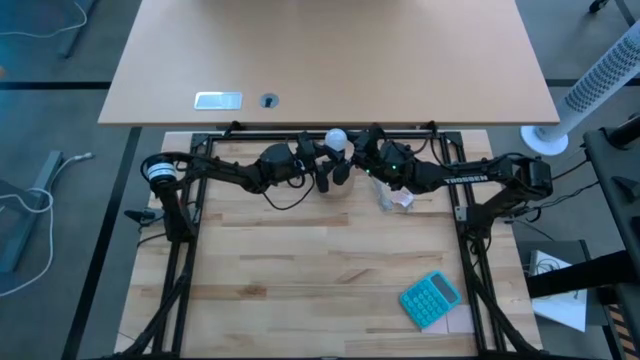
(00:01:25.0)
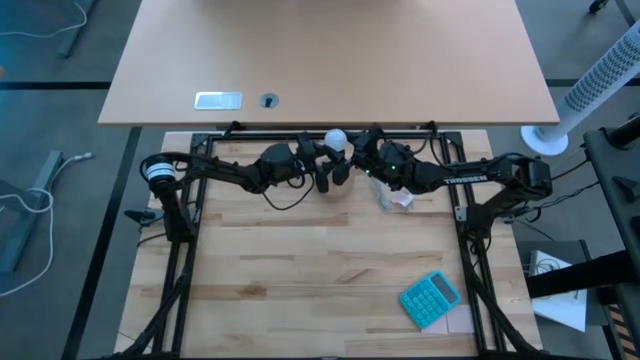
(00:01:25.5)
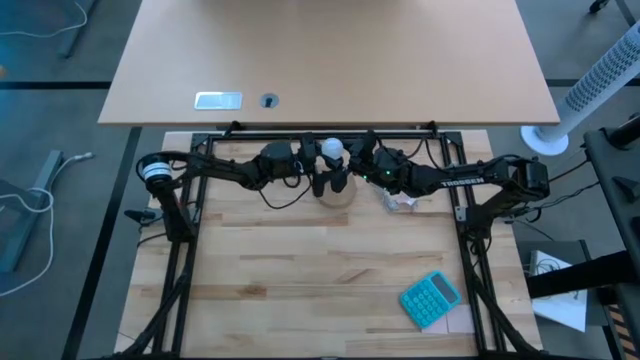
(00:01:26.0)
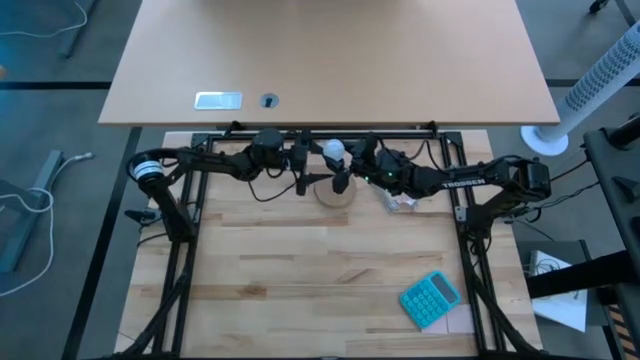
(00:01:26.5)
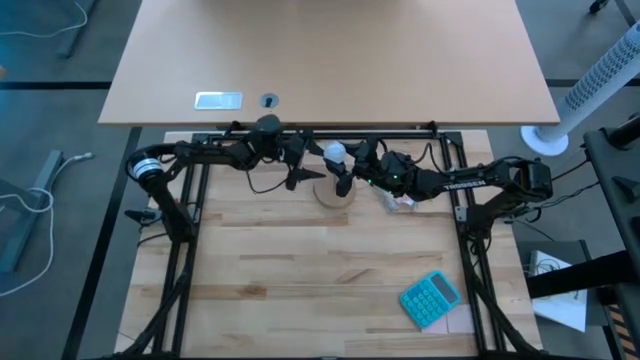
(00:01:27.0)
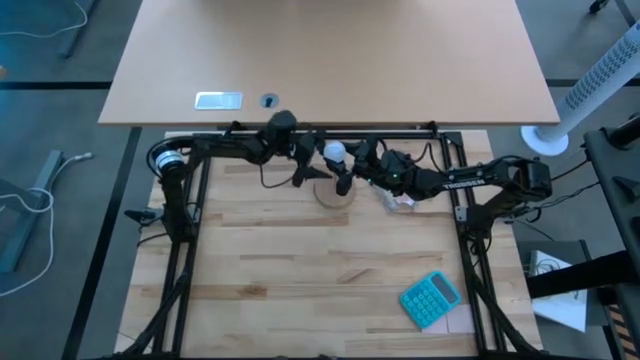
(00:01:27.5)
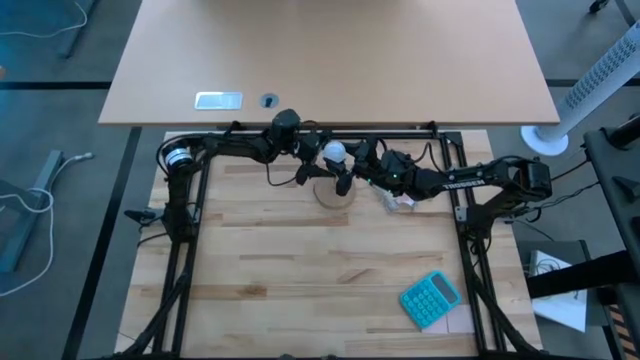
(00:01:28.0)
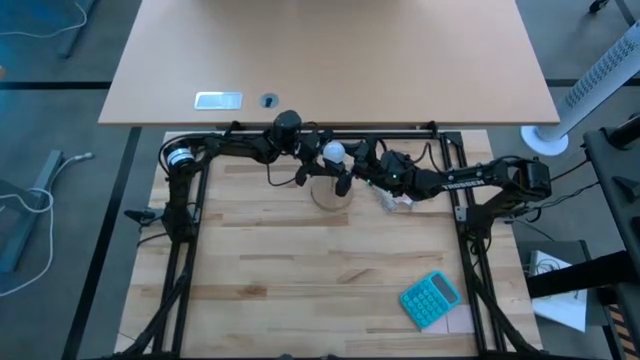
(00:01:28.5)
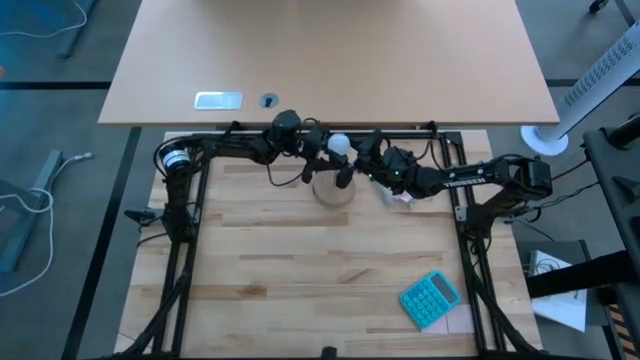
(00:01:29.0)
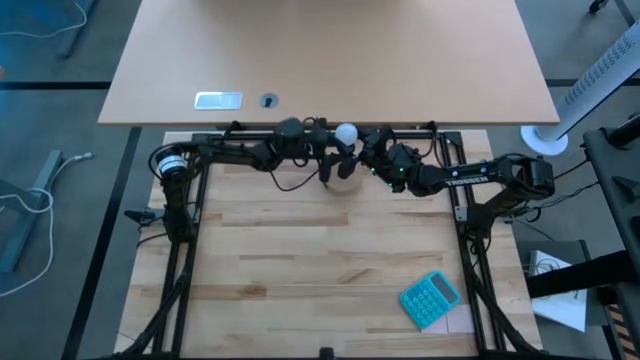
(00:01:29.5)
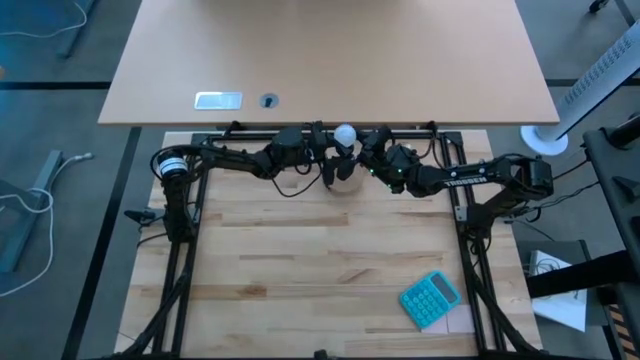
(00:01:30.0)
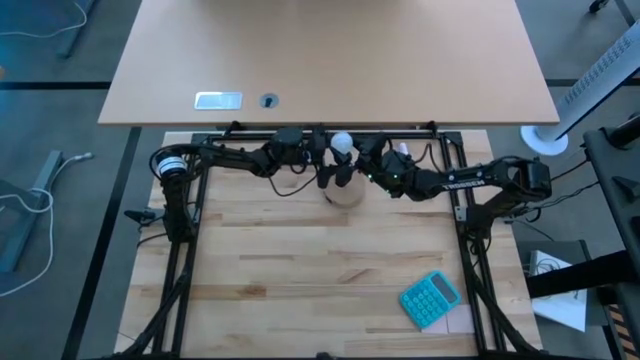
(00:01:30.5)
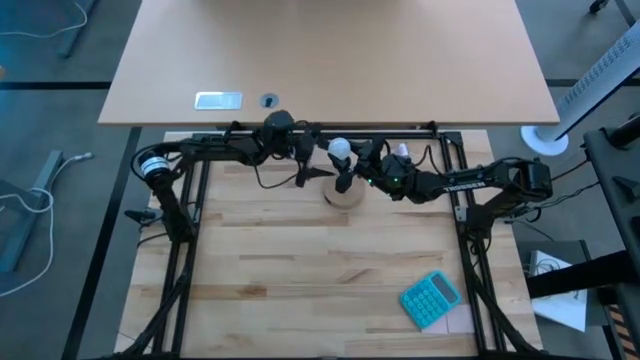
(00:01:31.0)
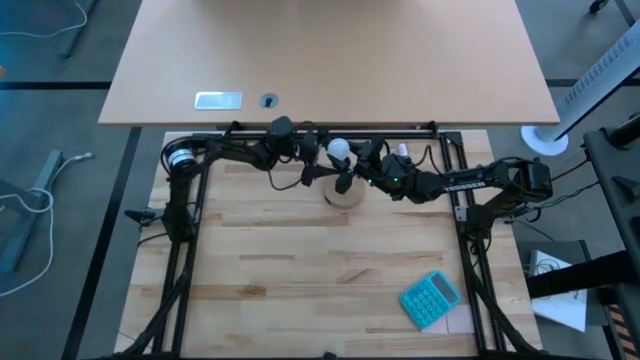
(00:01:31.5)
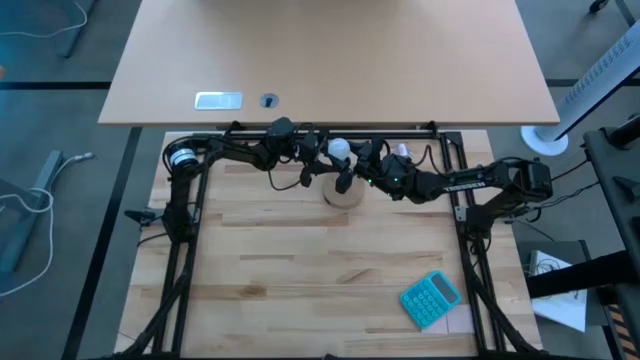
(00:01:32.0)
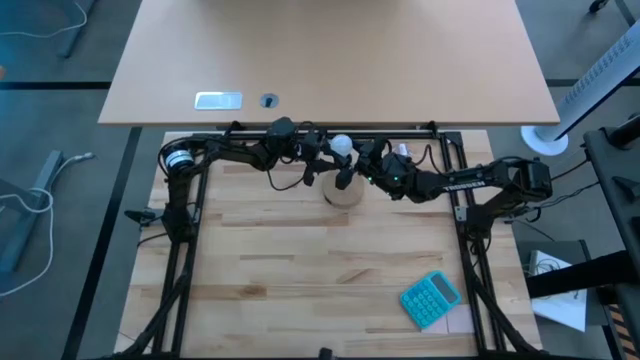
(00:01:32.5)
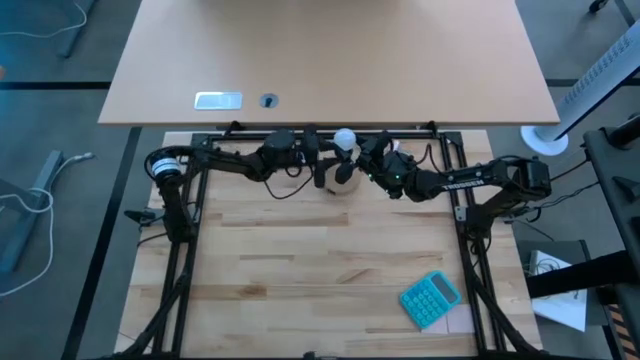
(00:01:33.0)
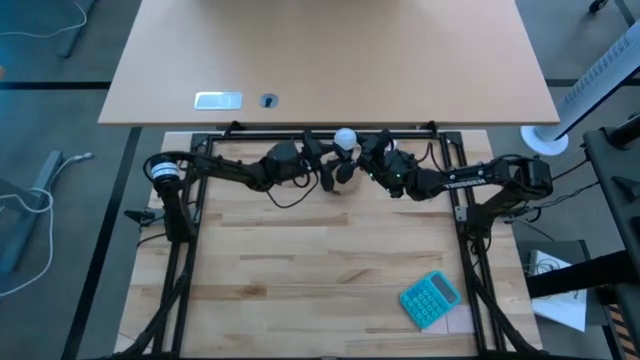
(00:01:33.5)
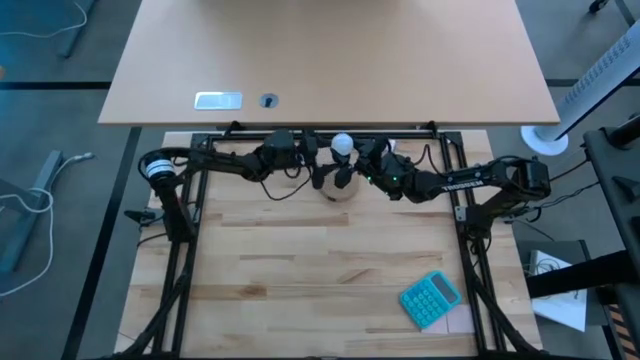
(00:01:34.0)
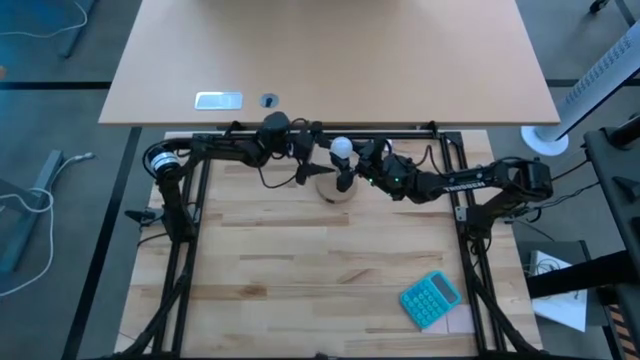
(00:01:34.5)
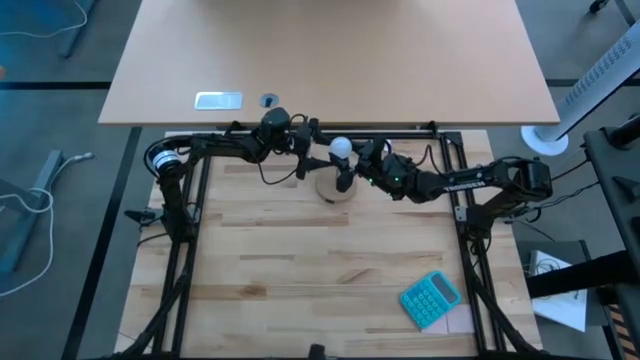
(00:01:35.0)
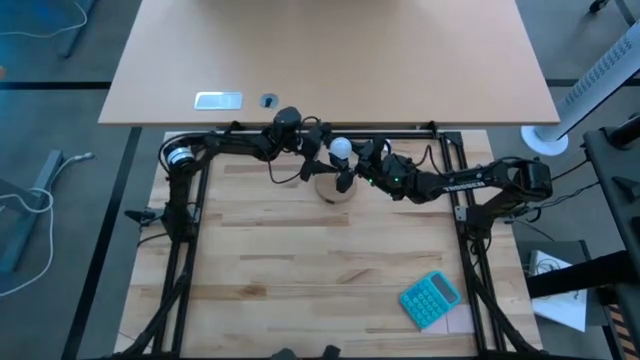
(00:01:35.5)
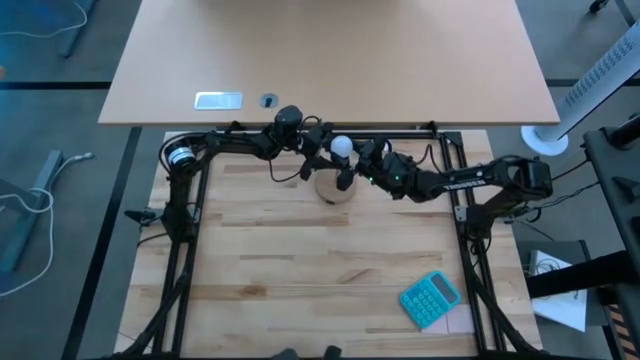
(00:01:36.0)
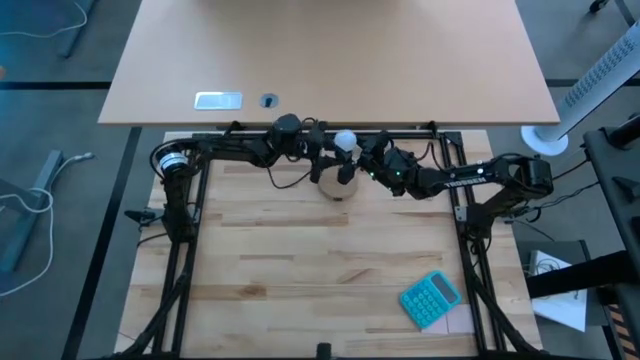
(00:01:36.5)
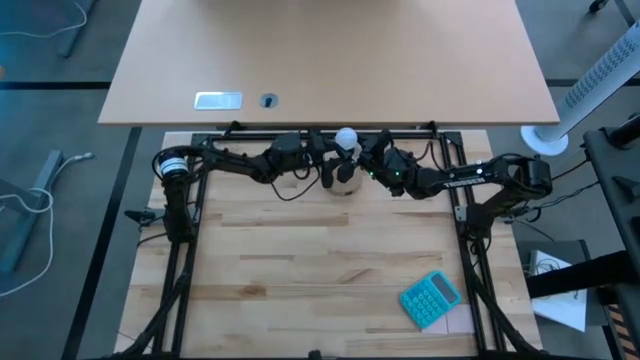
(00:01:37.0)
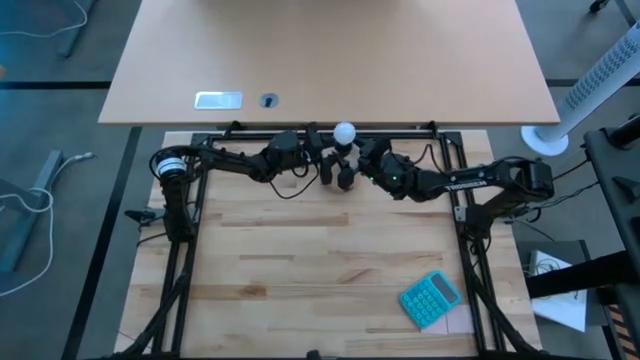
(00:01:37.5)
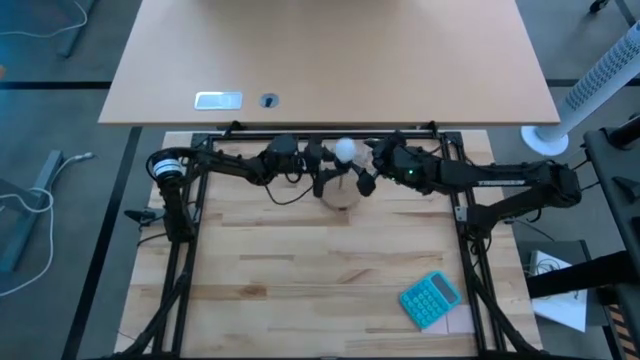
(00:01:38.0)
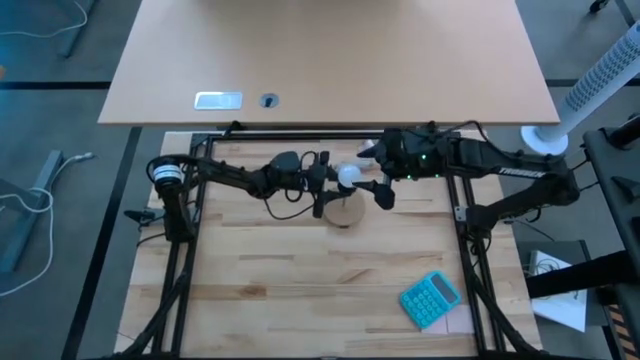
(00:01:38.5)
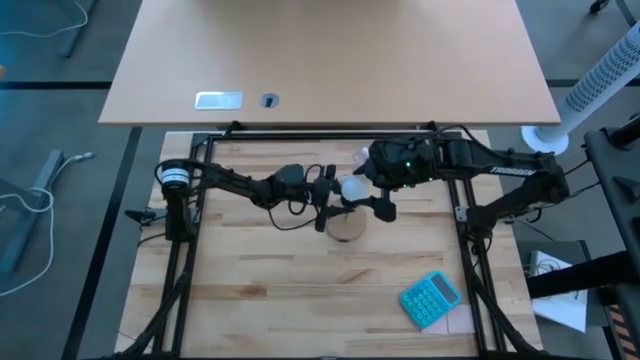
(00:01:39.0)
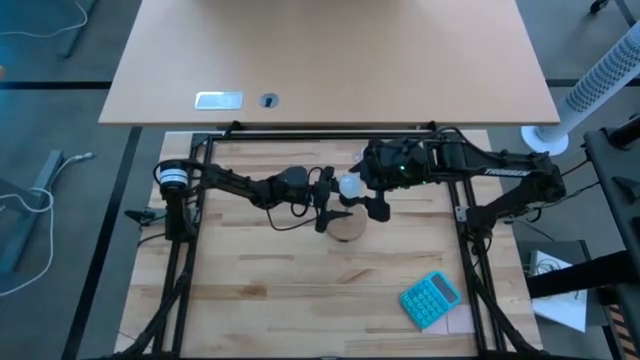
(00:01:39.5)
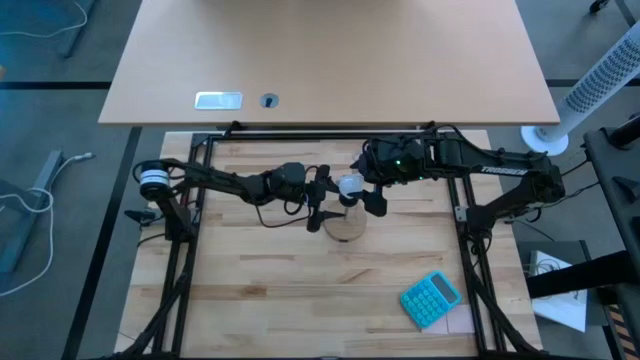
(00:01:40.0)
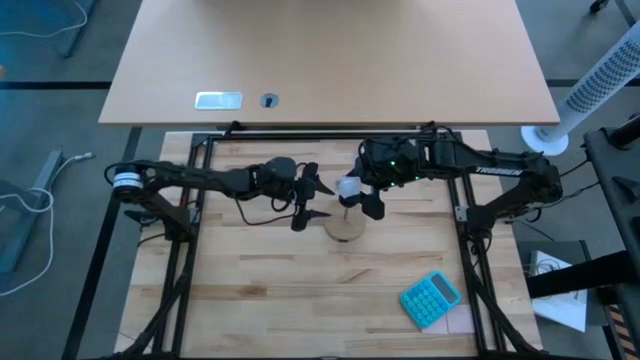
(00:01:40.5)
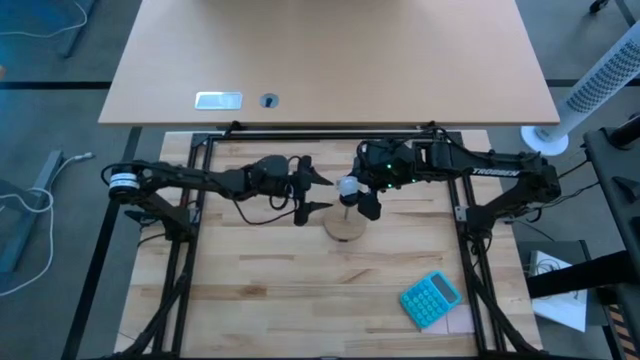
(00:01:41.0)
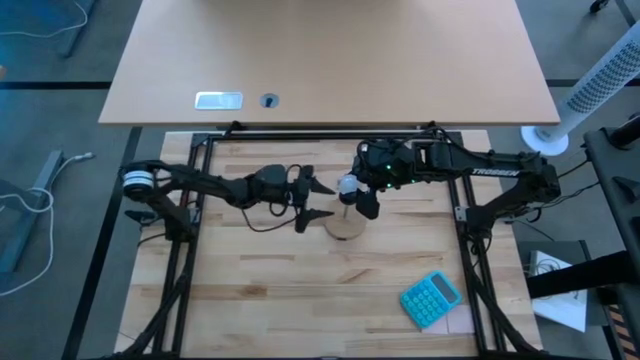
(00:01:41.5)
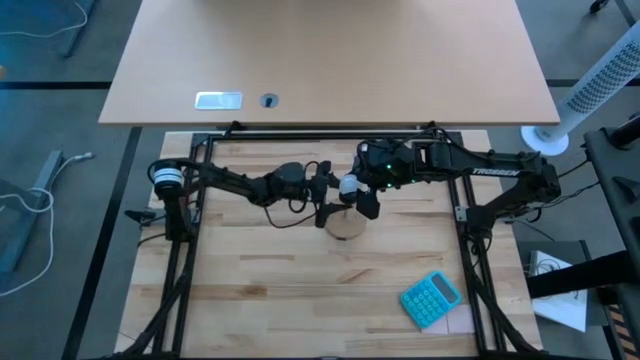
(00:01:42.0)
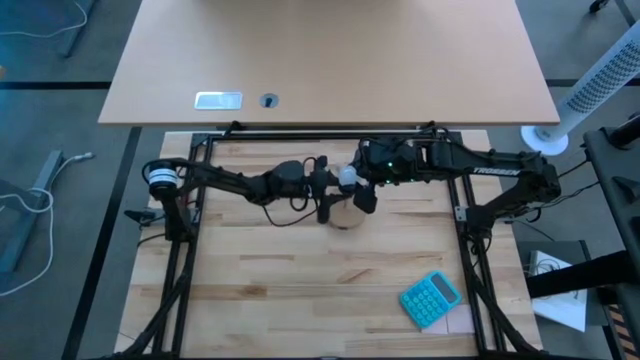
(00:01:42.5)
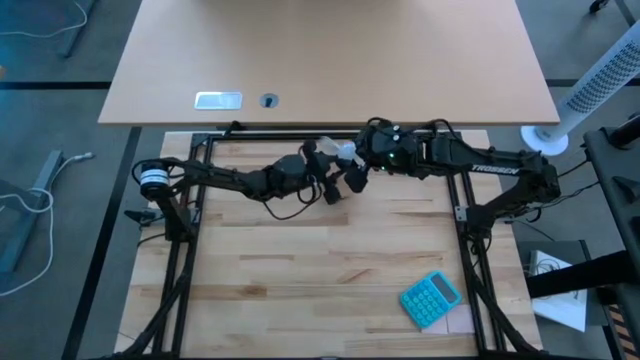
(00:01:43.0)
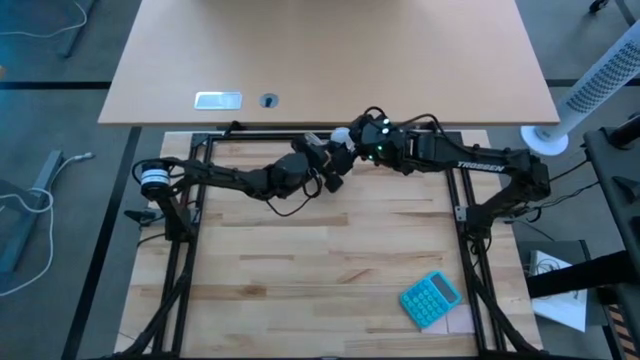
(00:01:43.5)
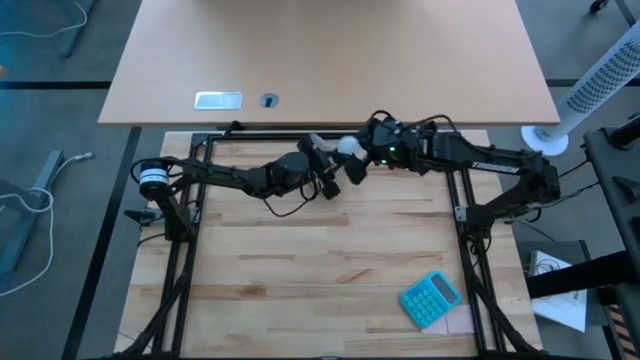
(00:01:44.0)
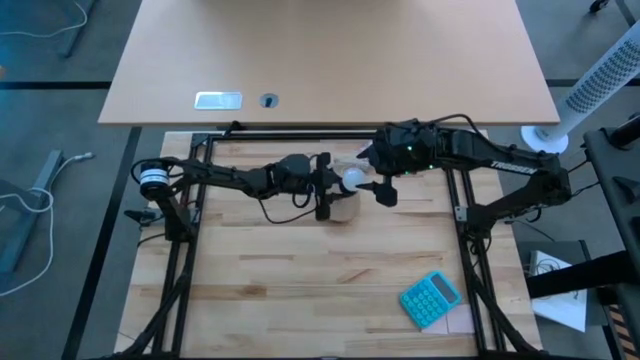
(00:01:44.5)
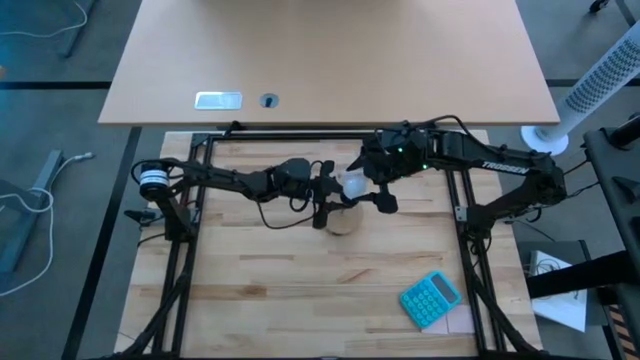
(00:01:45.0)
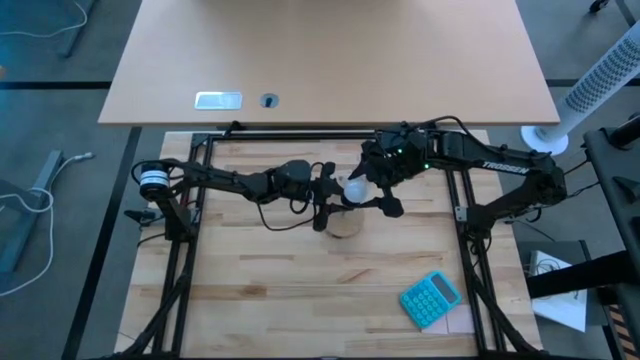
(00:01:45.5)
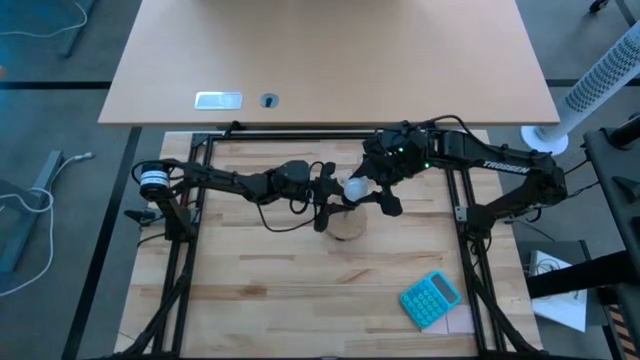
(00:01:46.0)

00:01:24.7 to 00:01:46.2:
Task: Screw lightbulb
Insert the lightbulb into the lamp
